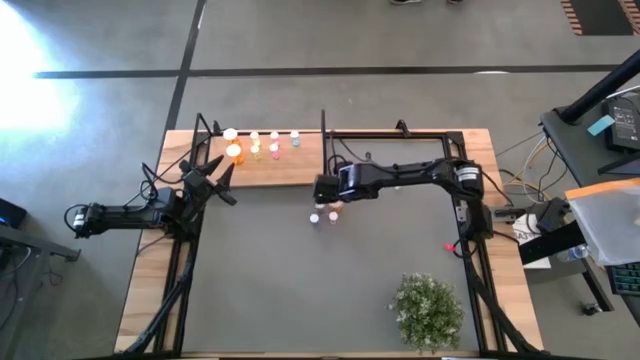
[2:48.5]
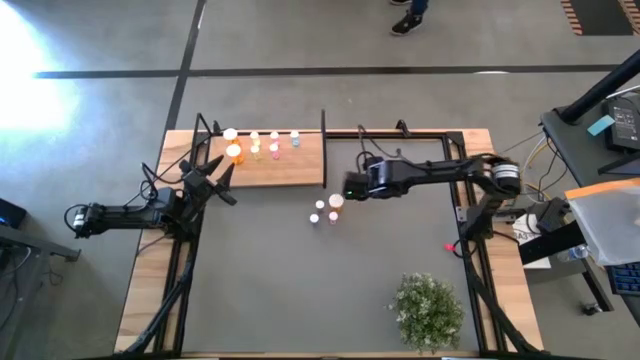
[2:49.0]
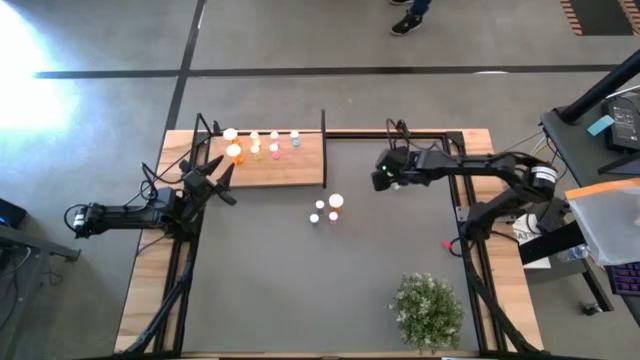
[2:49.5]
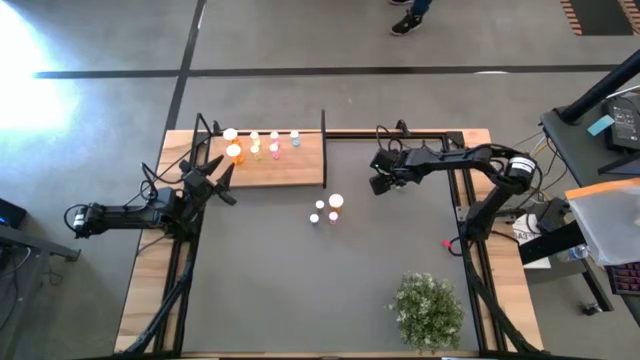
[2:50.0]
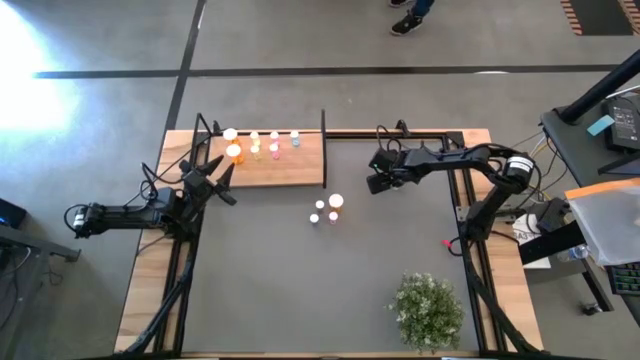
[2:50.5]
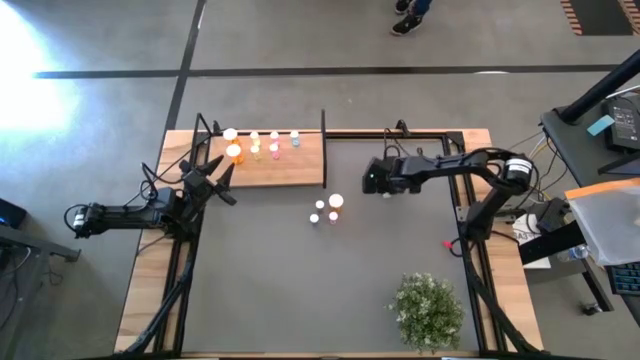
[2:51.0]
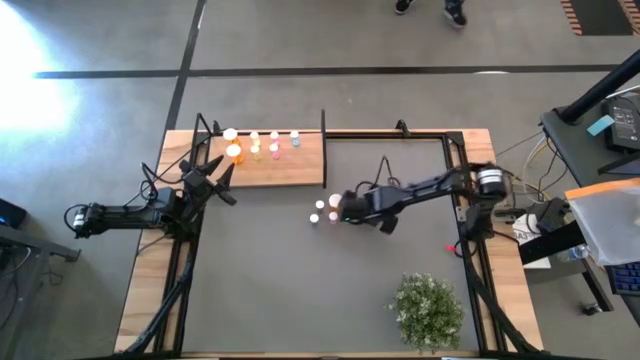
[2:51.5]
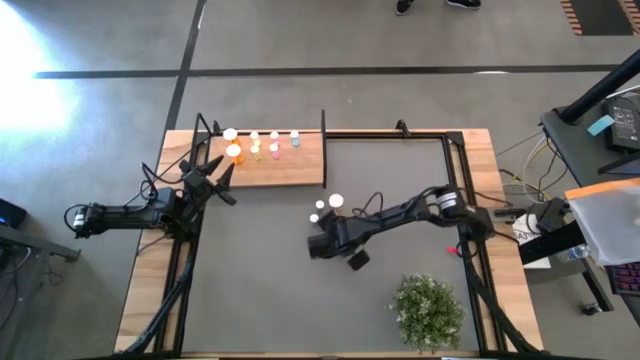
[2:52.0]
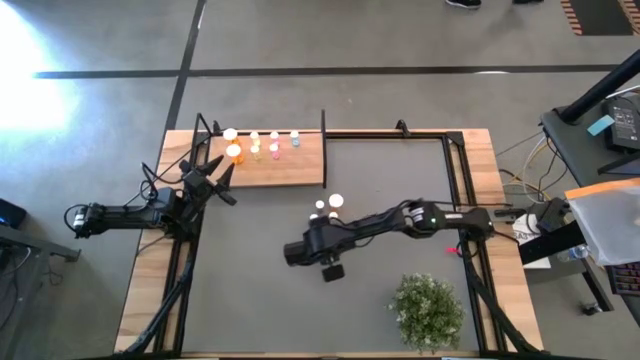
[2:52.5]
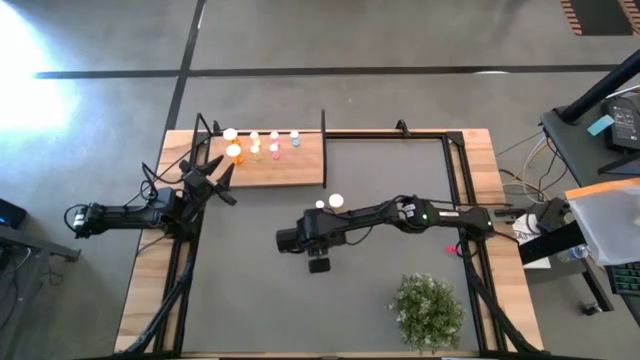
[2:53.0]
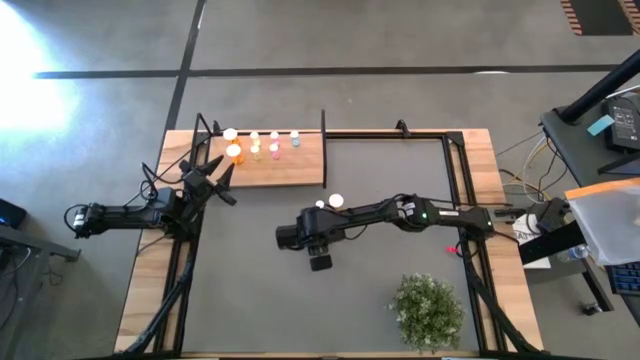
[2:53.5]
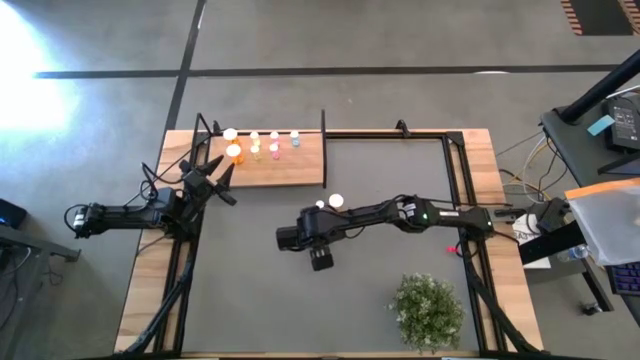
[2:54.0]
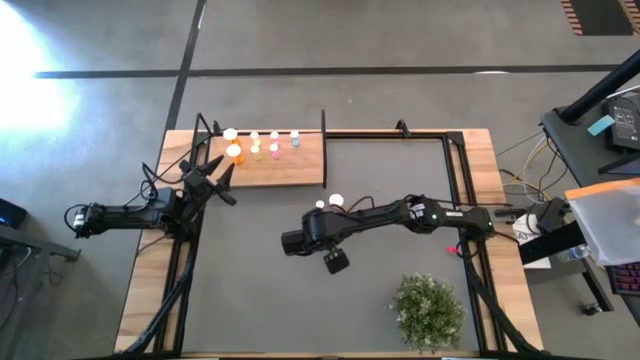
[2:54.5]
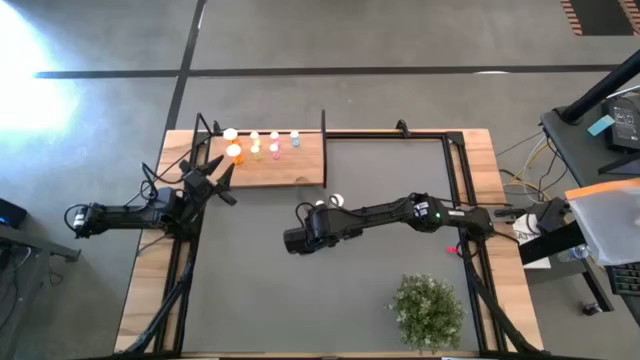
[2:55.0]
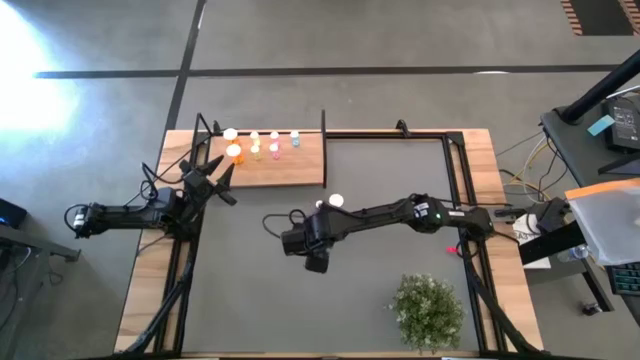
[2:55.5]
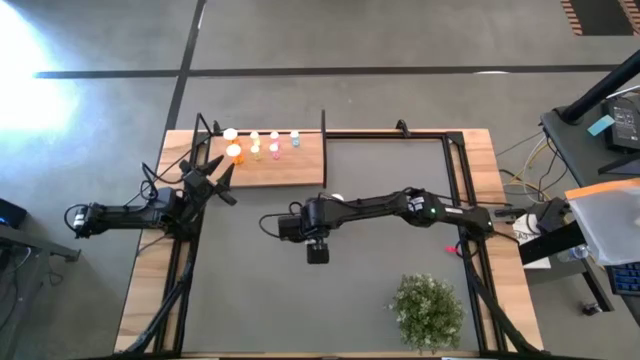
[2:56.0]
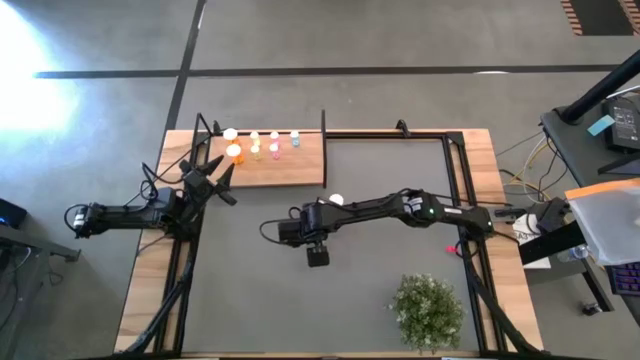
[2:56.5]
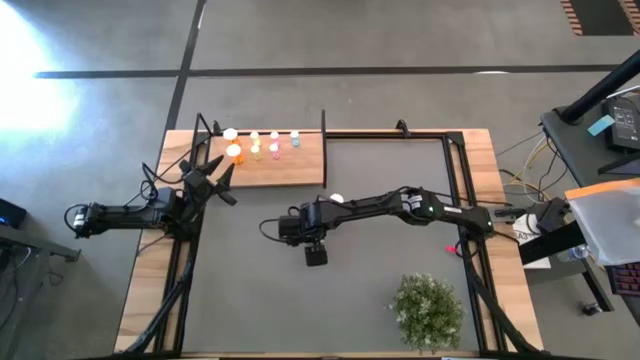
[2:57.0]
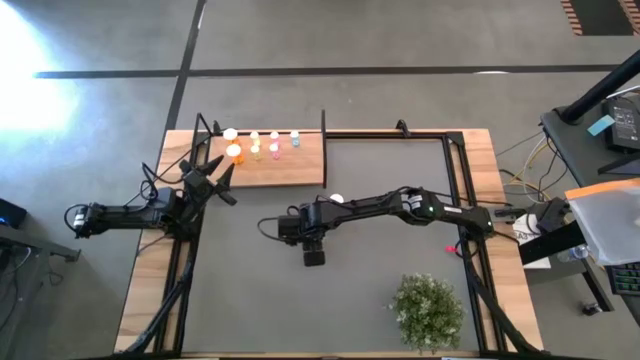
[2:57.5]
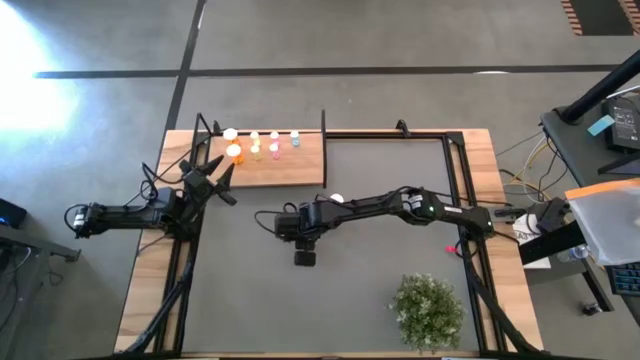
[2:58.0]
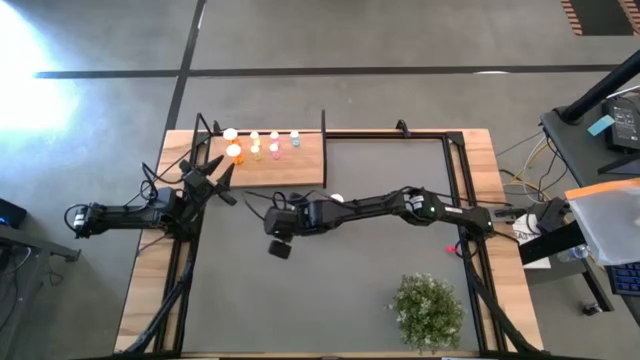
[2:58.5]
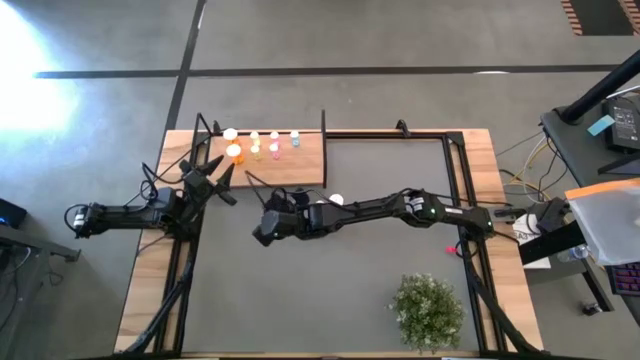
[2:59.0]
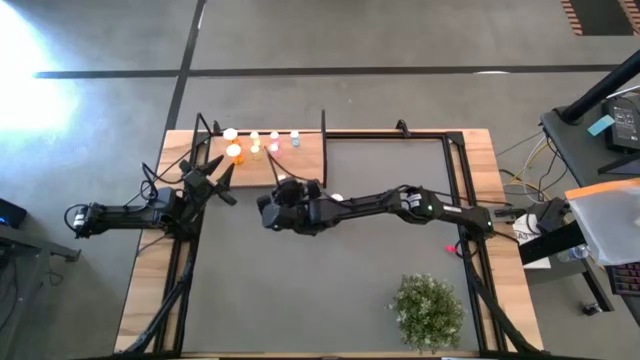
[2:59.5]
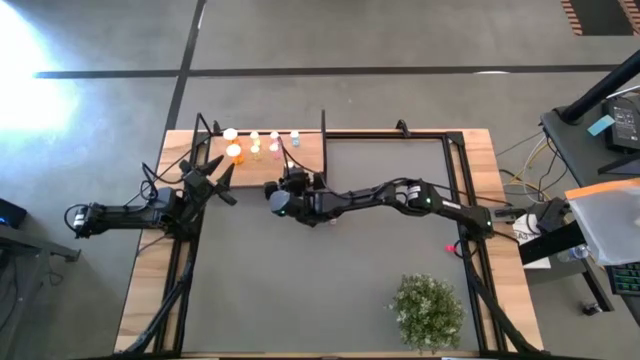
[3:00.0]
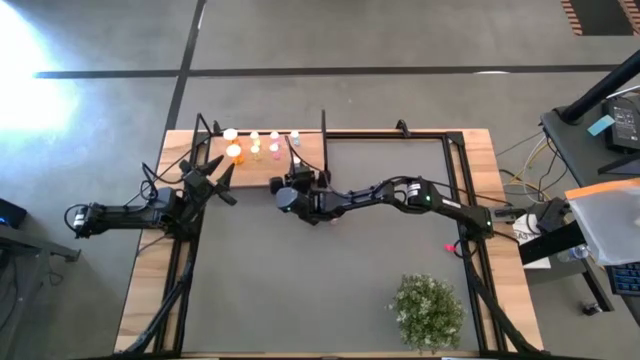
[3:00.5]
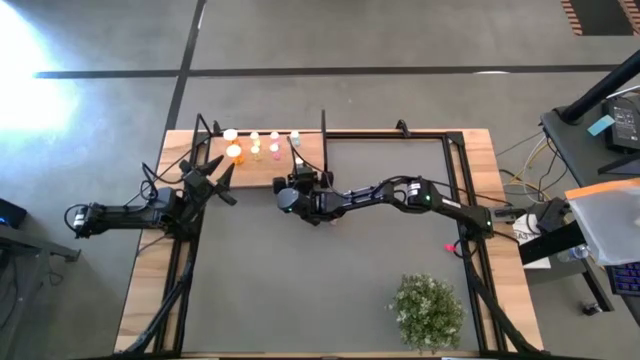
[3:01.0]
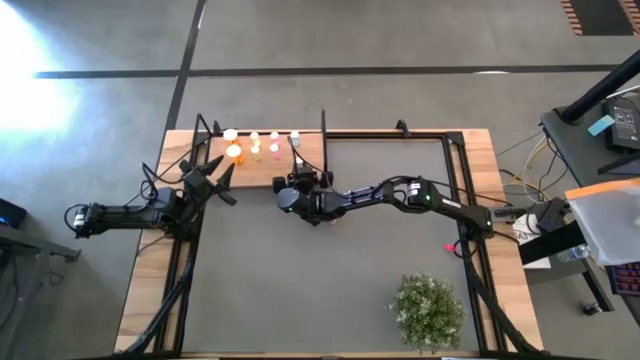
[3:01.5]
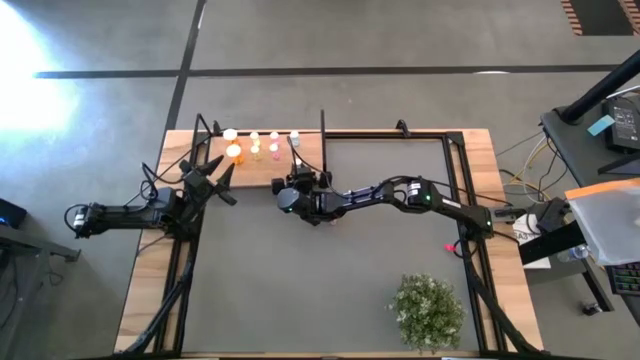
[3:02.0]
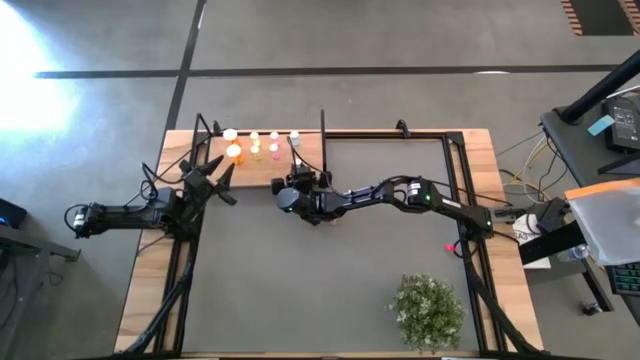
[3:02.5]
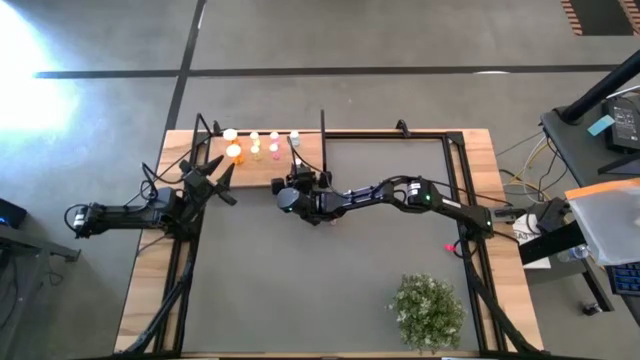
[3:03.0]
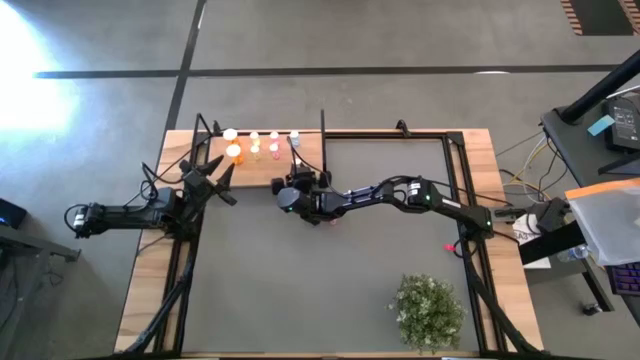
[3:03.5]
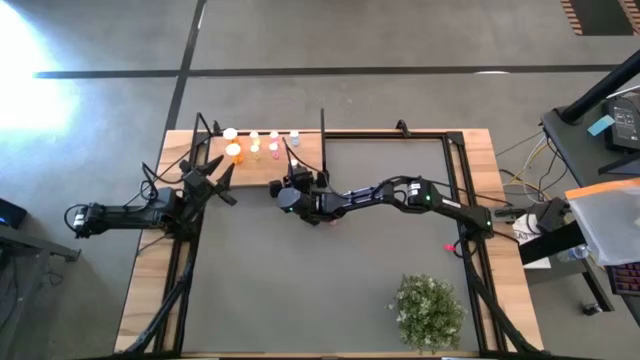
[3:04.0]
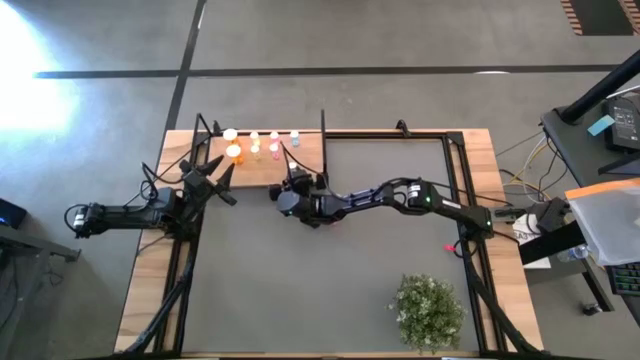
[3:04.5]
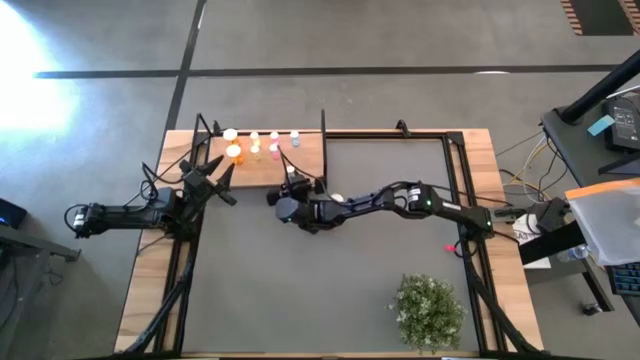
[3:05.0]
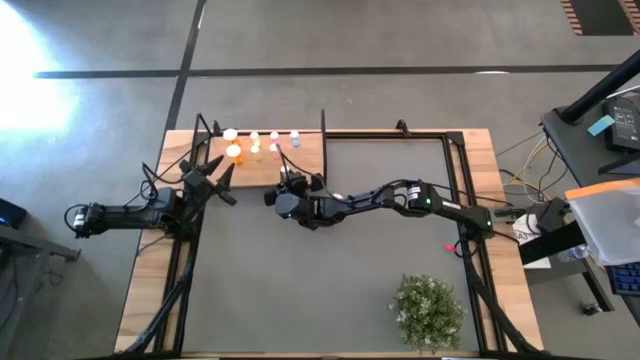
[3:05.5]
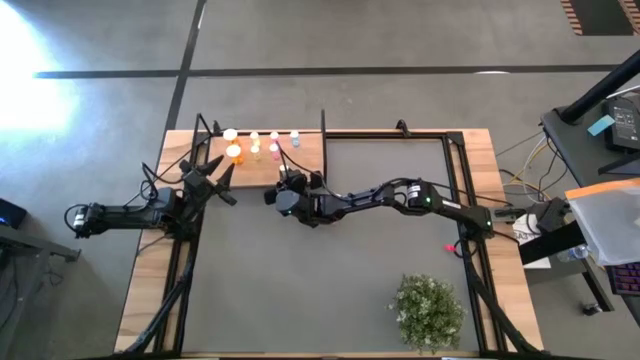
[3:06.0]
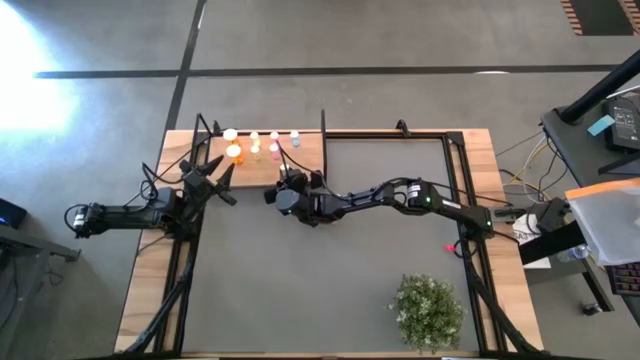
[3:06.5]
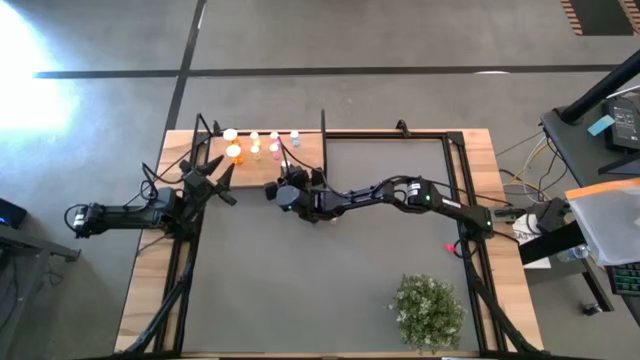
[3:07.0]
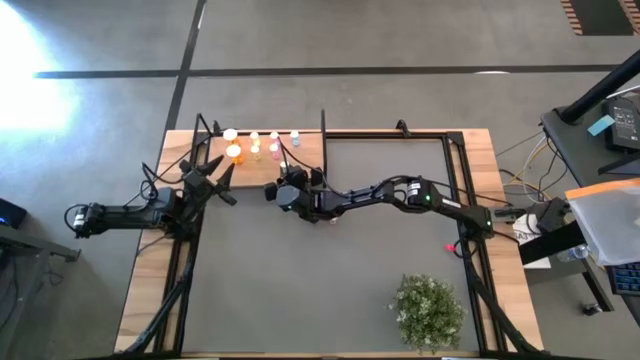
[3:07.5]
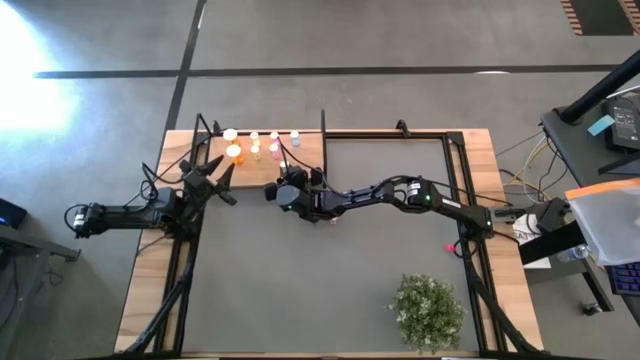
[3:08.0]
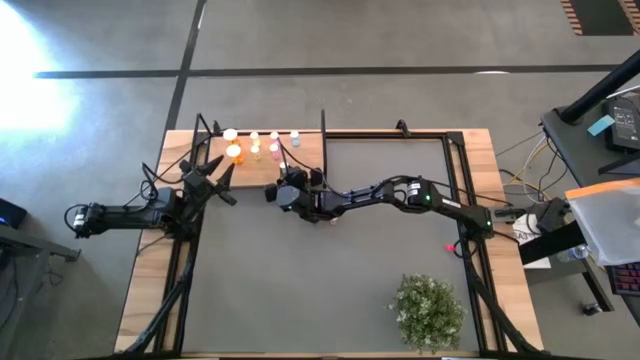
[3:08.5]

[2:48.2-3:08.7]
Task: Pick and place medicine bottles onto shelf by color
Put the yellow pill bottle on the shelf aligned with the other yellow pill bottle

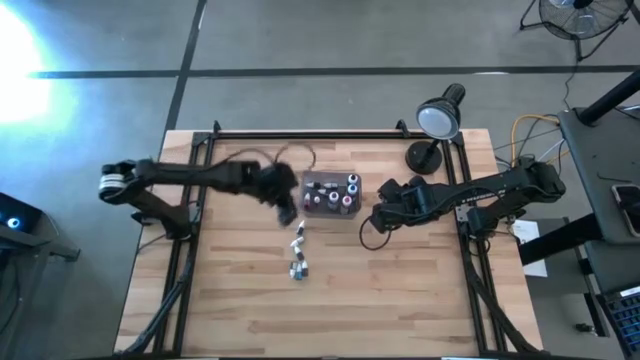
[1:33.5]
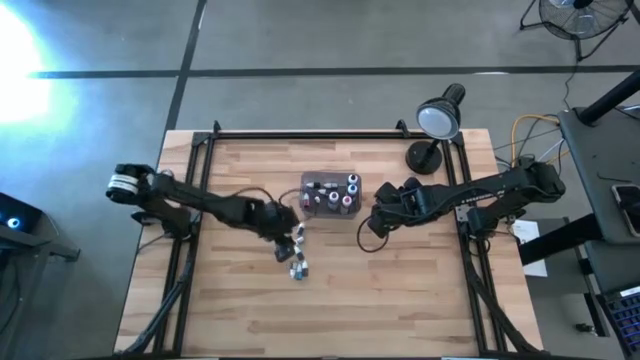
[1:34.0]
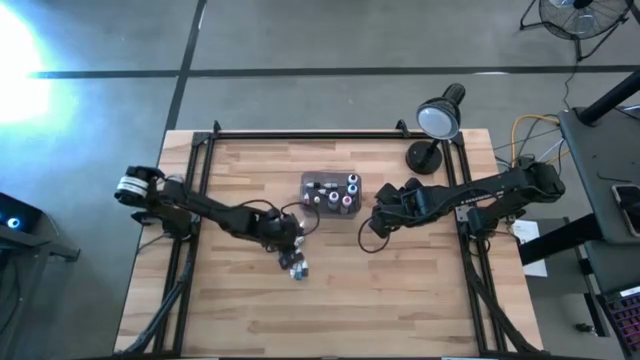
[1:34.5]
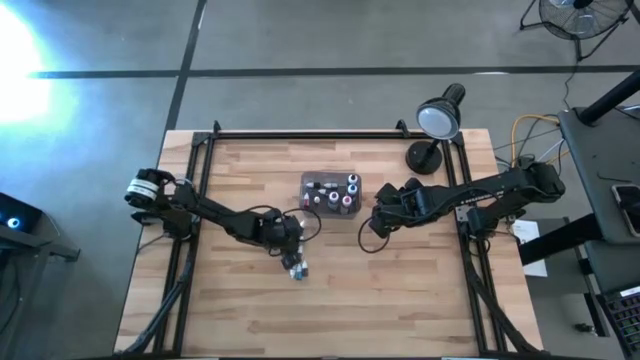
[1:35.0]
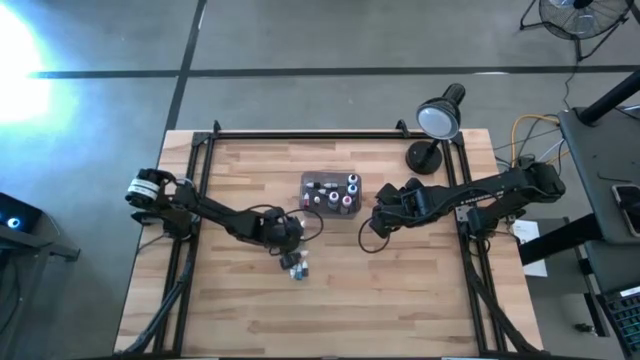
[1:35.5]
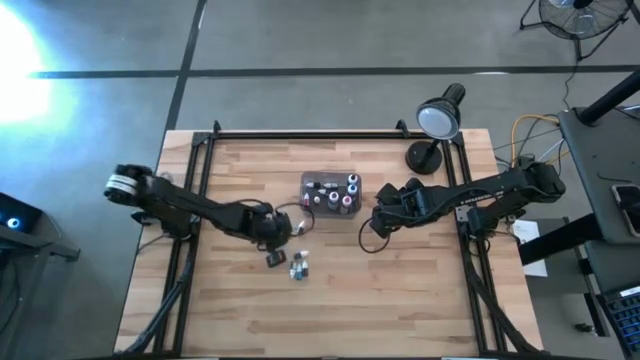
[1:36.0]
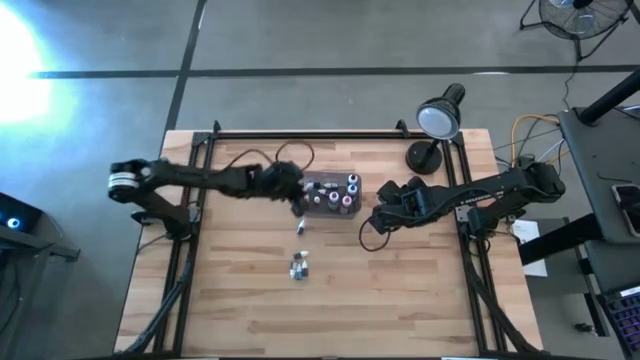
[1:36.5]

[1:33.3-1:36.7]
Task: Pick & Place food coloring
Put the small light green food coloring bottle into the bin
